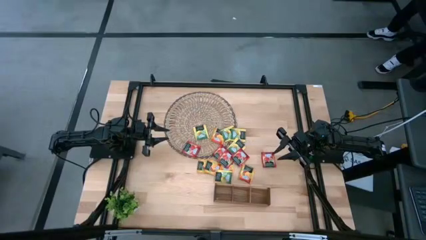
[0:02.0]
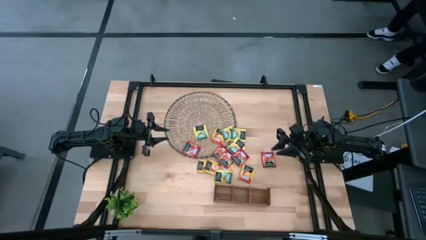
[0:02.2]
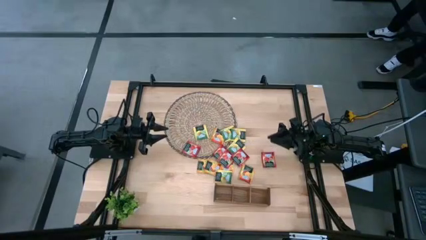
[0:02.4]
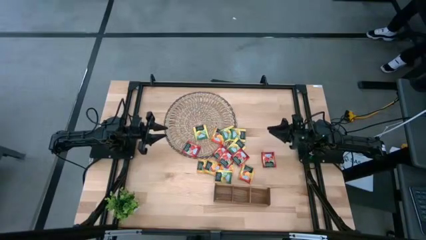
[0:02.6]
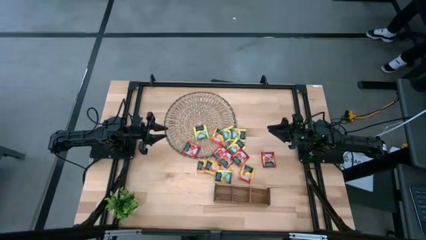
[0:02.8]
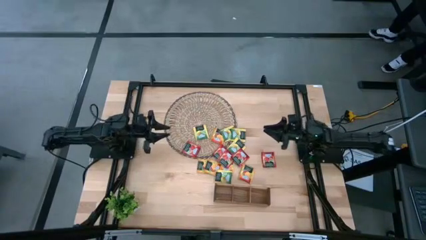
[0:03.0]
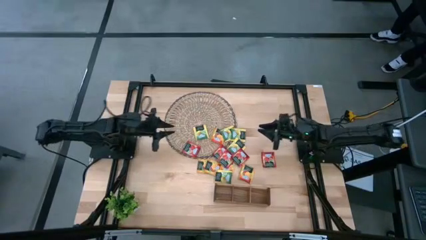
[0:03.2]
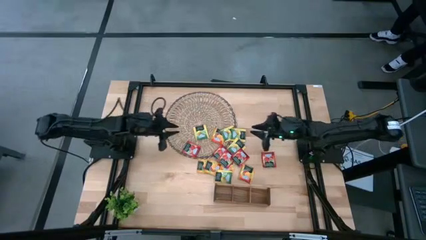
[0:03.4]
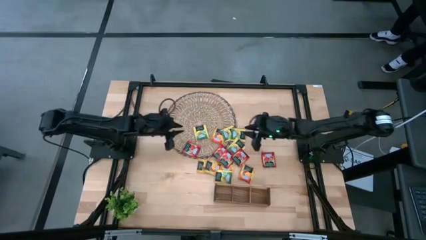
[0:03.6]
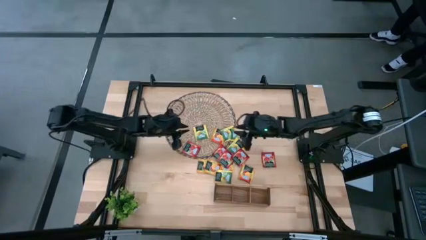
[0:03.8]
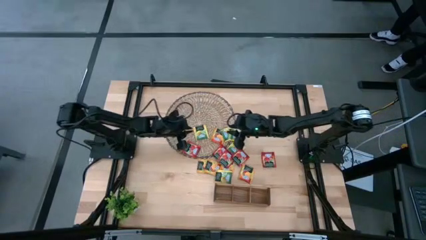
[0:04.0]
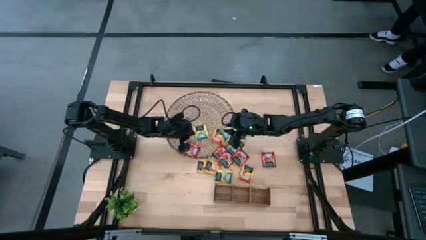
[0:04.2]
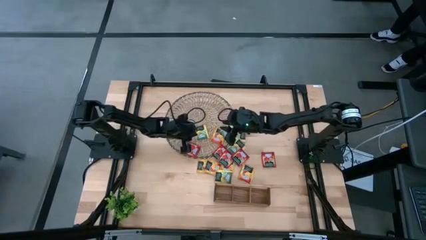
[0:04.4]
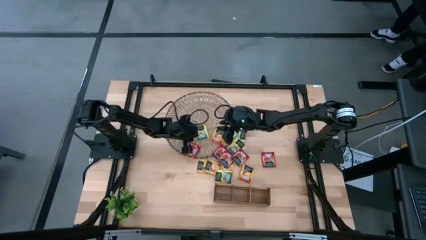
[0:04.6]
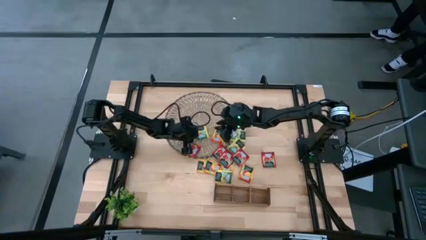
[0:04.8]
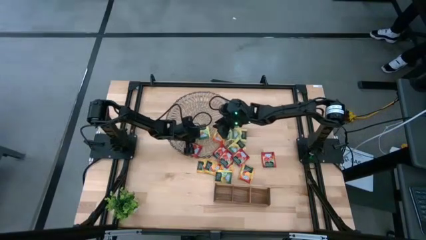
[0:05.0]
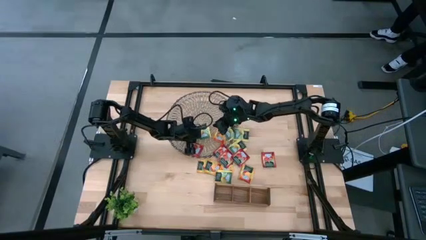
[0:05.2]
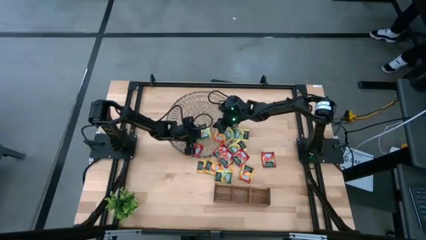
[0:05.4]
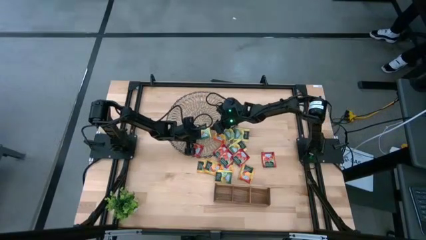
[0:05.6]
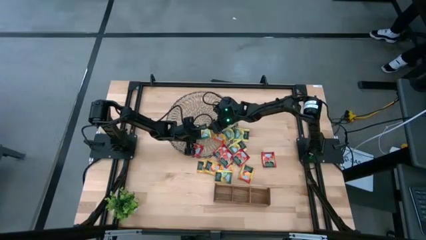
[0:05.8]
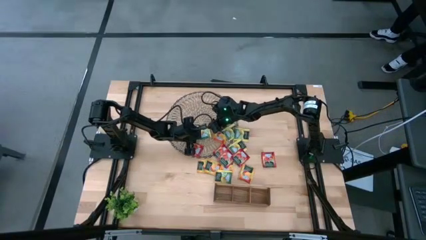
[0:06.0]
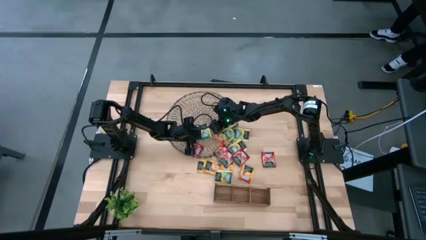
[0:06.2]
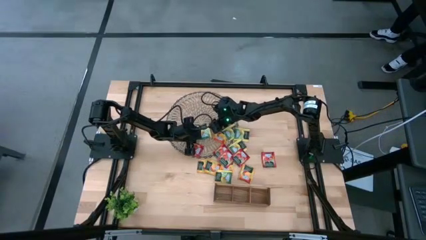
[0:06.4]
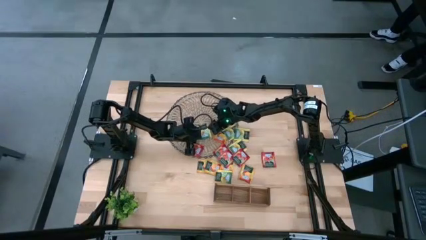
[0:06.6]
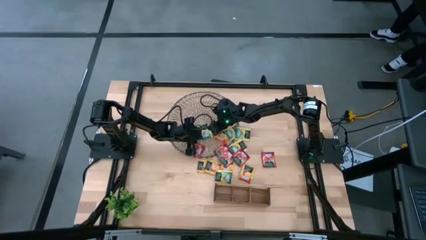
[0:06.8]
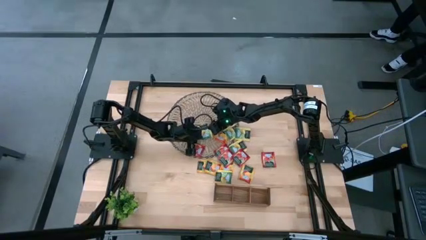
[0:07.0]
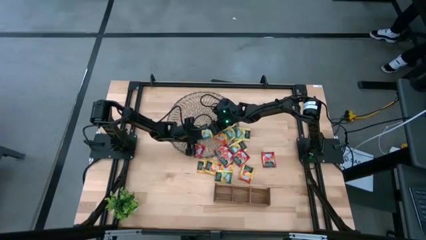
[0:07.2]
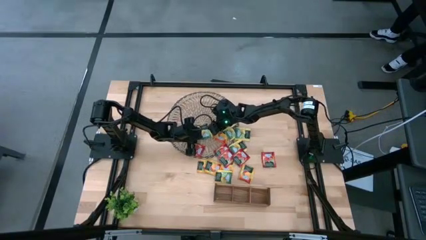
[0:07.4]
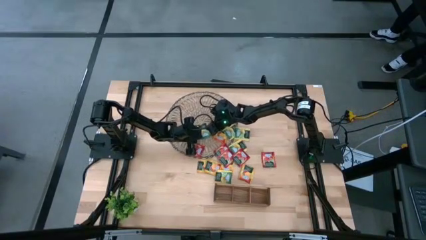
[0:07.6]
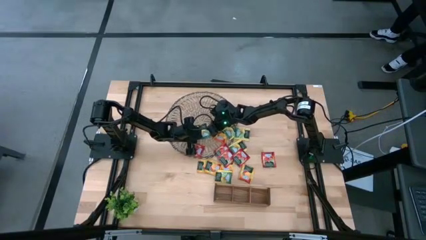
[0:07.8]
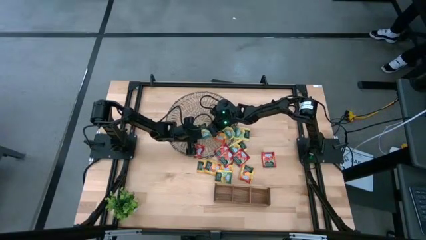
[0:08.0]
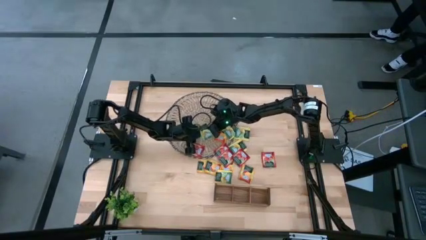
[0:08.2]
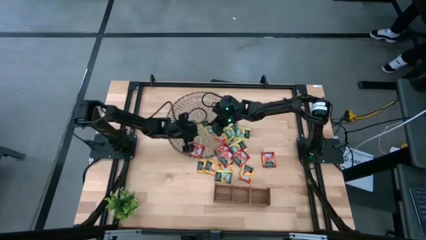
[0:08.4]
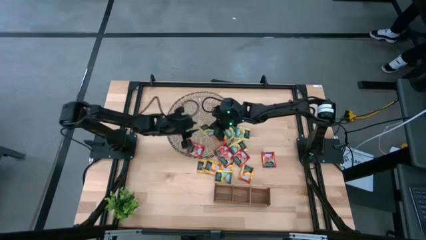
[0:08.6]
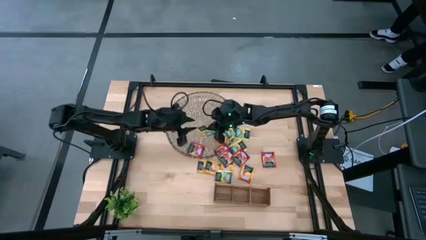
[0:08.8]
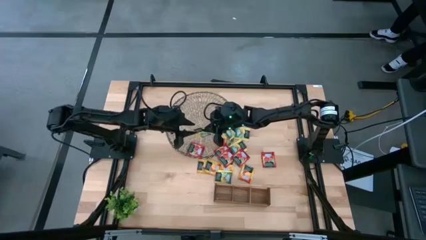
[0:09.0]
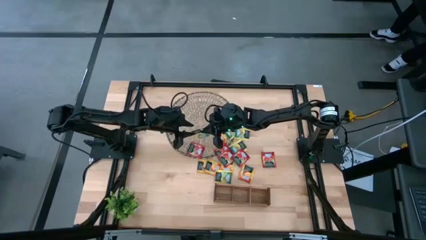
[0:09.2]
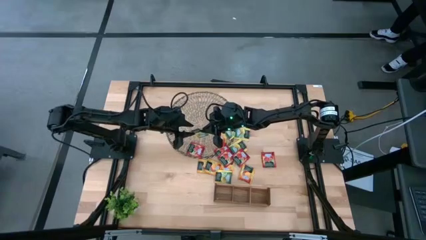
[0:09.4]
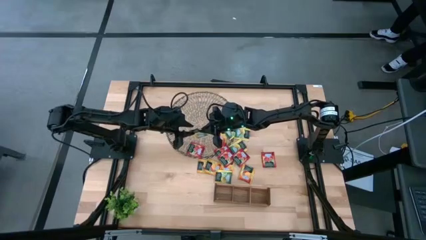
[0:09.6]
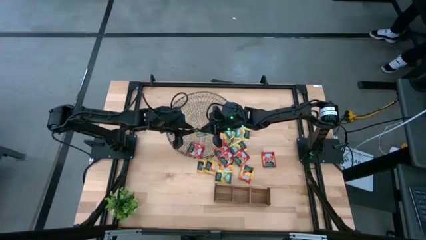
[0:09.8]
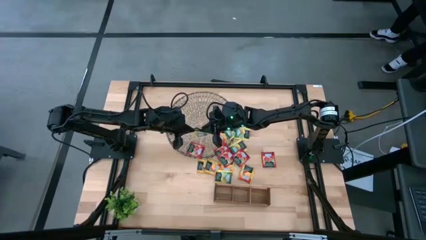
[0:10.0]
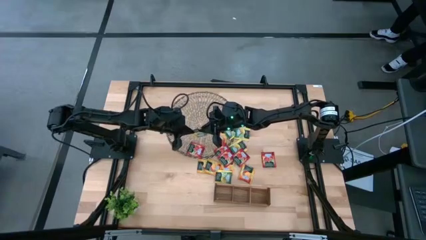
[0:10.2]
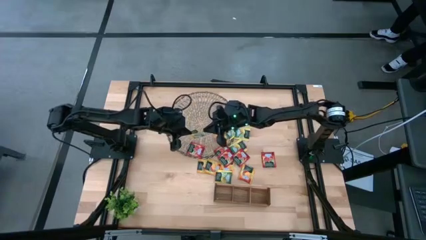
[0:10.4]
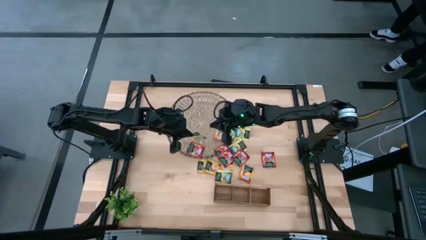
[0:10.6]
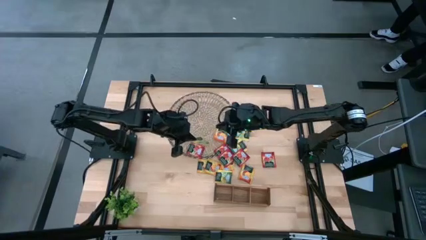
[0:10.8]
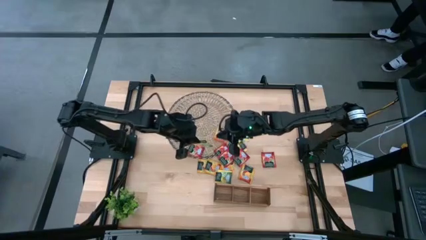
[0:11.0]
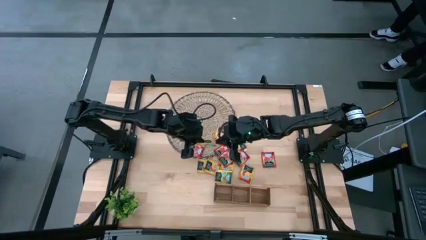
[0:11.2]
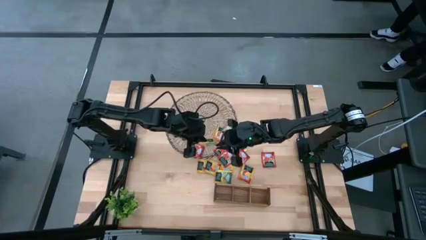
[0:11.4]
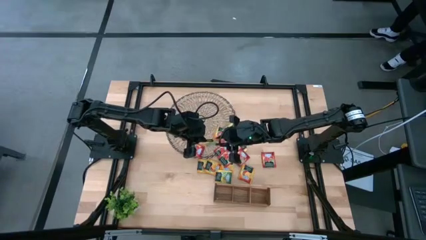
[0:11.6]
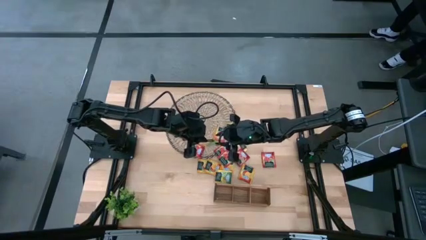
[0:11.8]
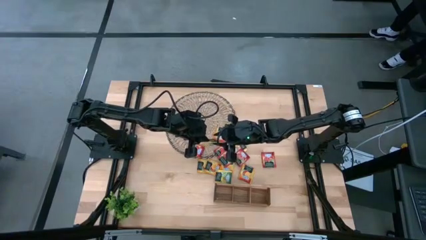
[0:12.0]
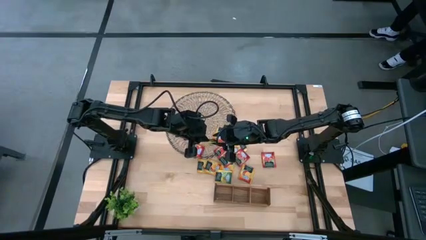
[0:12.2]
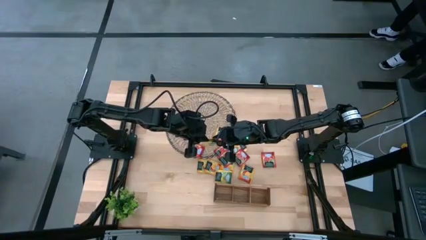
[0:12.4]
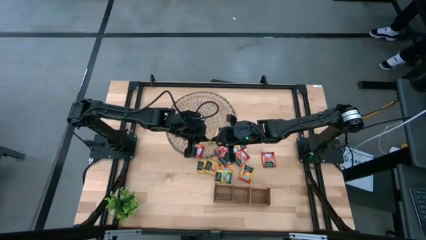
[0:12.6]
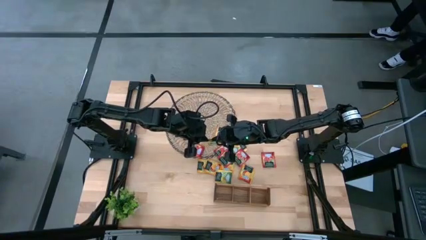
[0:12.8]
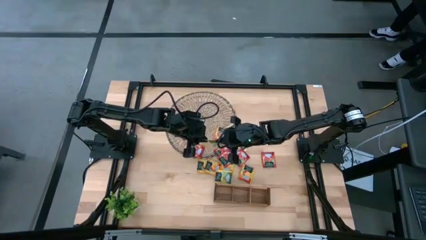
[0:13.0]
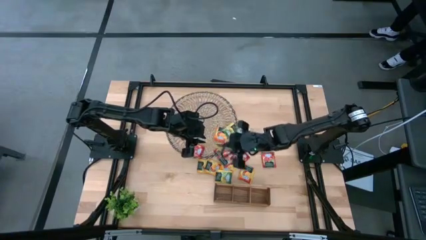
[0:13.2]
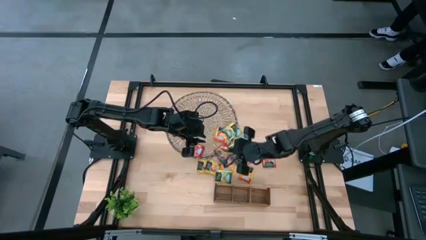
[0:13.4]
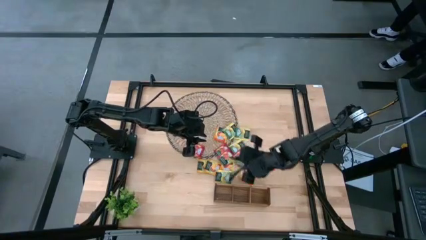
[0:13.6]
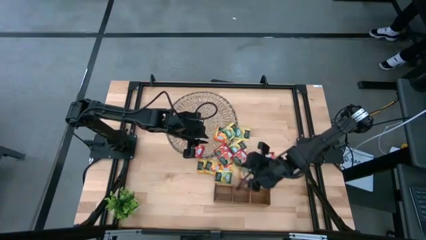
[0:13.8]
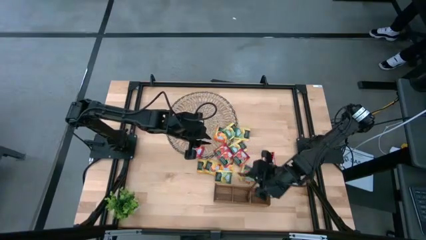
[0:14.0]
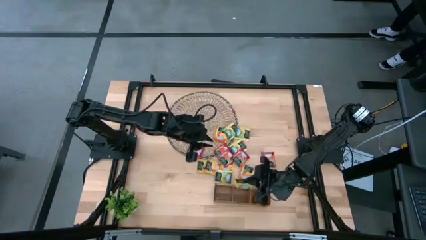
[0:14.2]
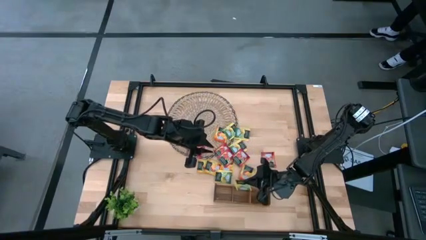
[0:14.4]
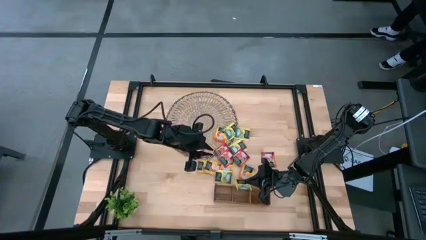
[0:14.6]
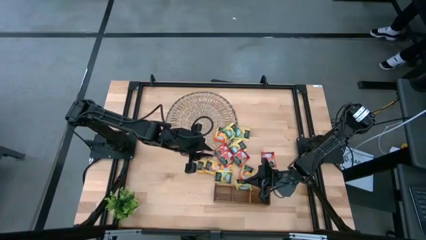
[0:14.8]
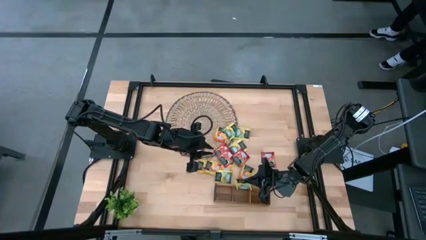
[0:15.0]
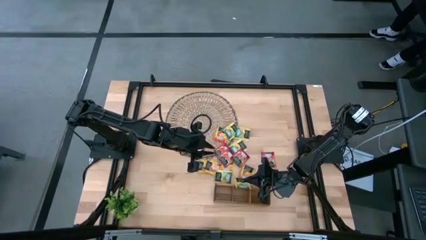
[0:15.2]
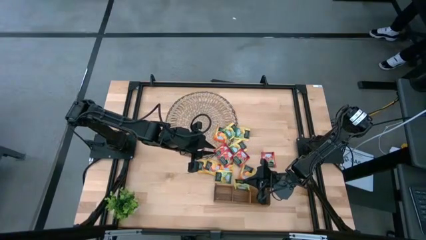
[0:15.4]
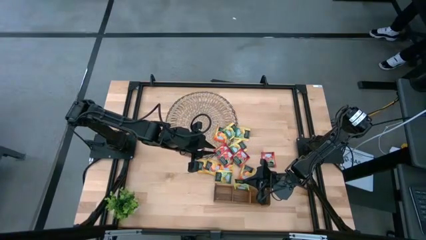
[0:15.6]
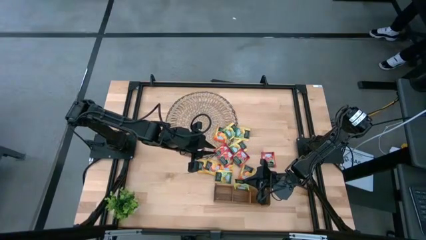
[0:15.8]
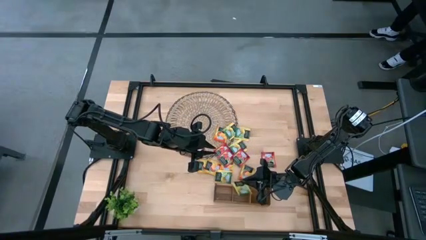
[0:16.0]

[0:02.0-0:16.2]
Task: Pick & Place Tea
Put the yellow tea bag into the middle section of the wooden organizer

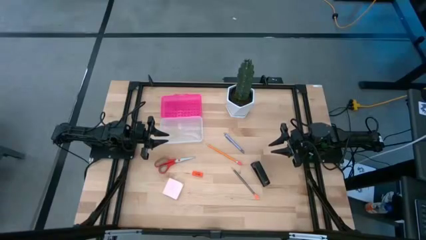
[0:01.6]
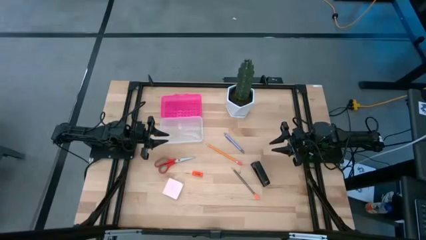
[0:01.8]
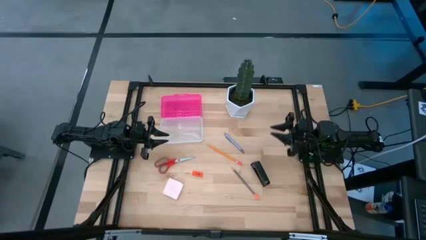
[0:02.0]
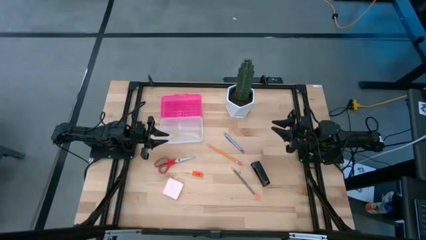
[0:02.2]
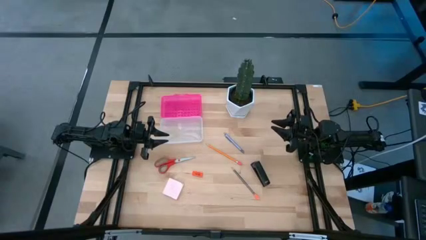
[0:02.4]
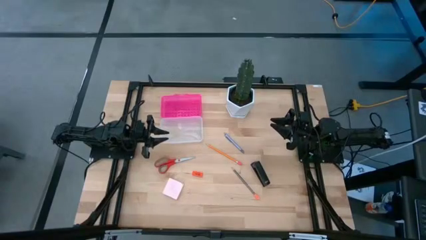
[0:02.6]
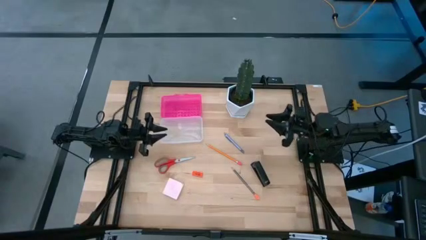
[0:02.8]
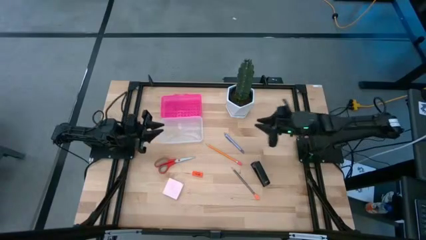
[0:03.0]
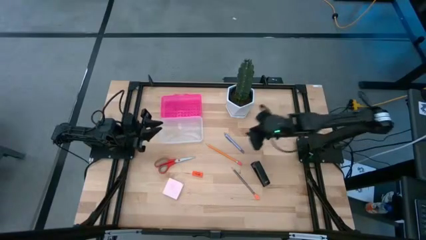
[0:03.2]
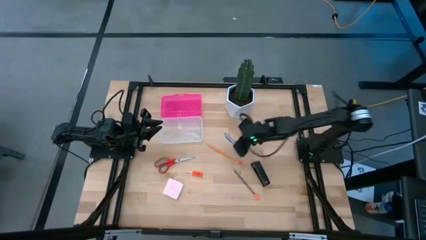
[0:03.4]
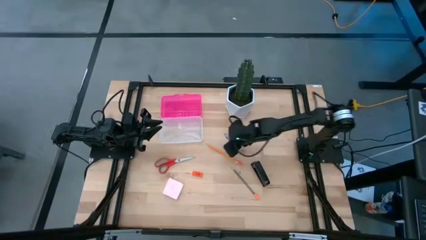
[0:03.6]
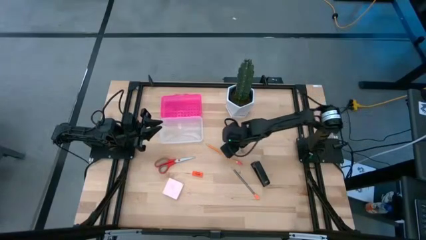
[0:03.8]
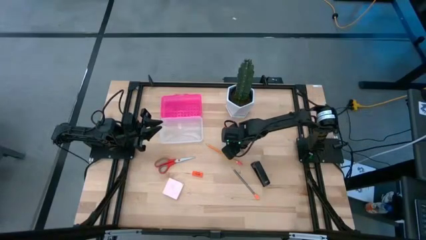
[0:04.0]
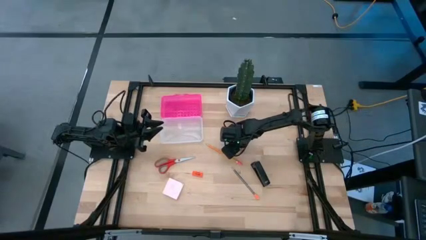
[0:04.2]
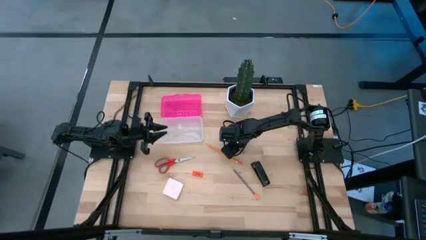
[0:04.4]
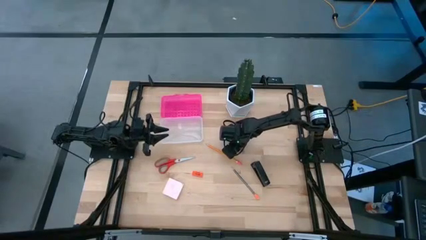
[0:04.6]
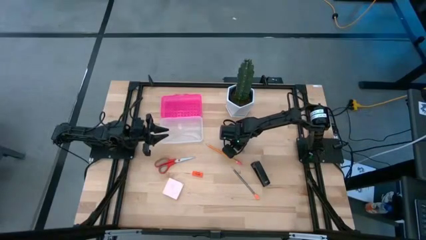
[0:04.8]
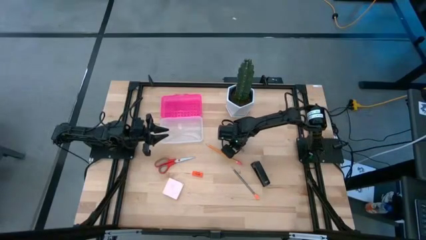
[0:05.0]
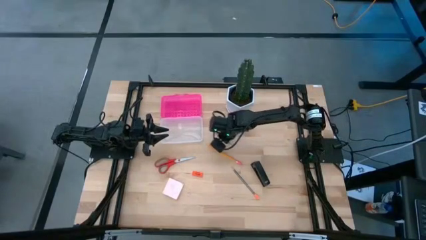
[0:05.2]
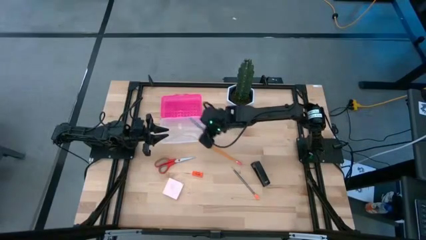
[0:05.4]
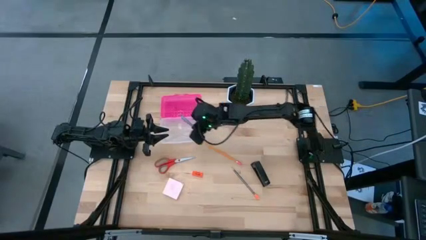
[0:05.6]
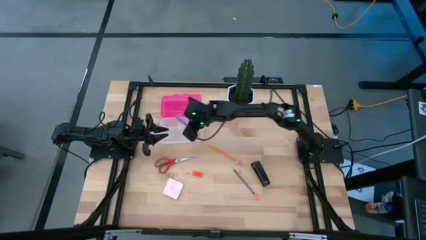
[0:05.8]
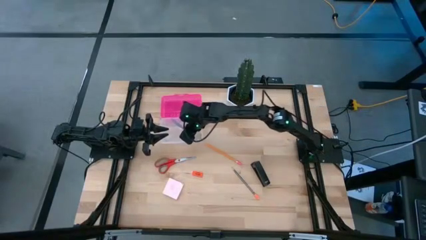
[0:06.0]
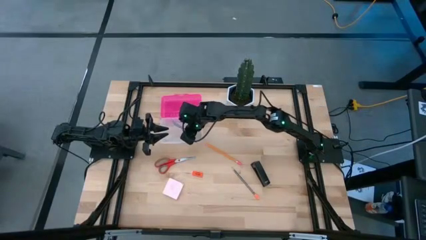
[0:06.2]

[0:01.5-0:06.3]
Task: Pack school essentials
Put the purple pen into the supply box
